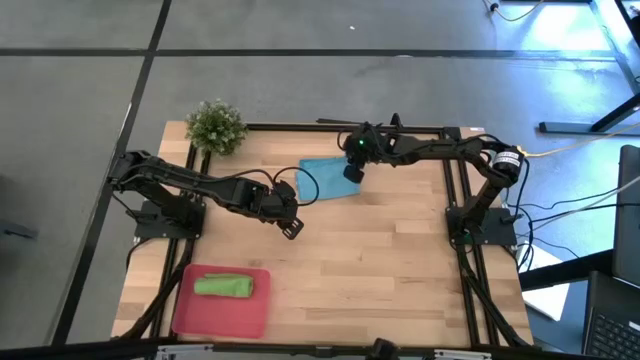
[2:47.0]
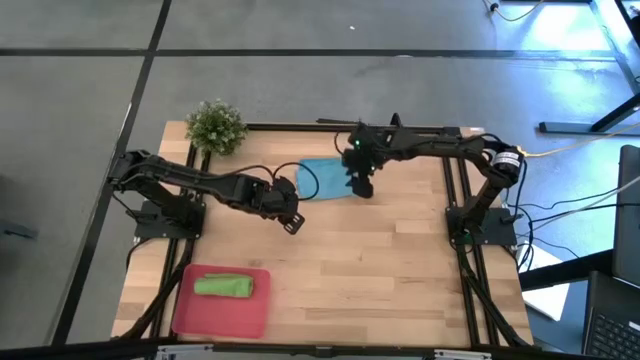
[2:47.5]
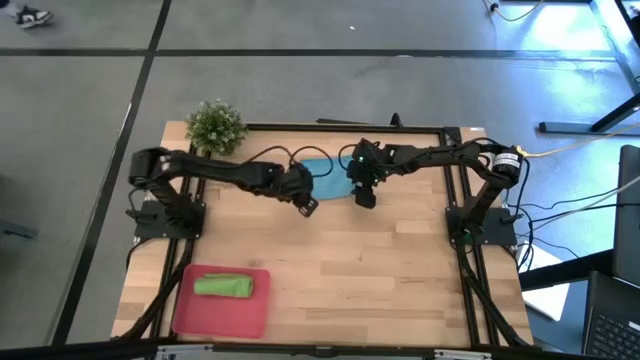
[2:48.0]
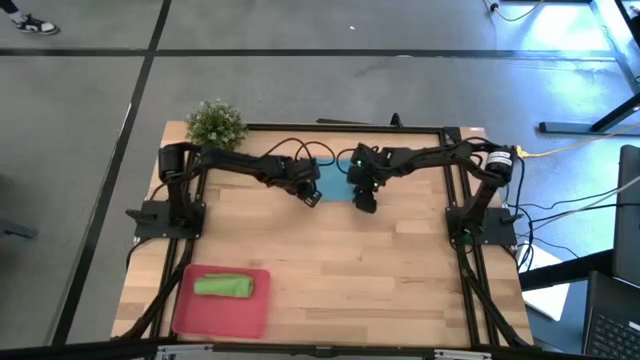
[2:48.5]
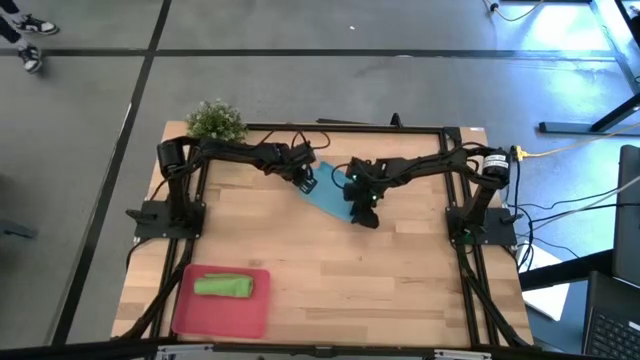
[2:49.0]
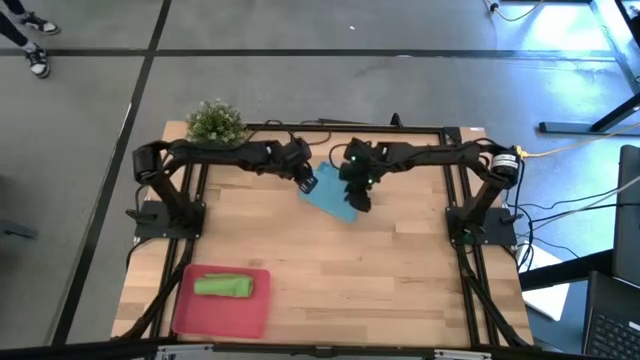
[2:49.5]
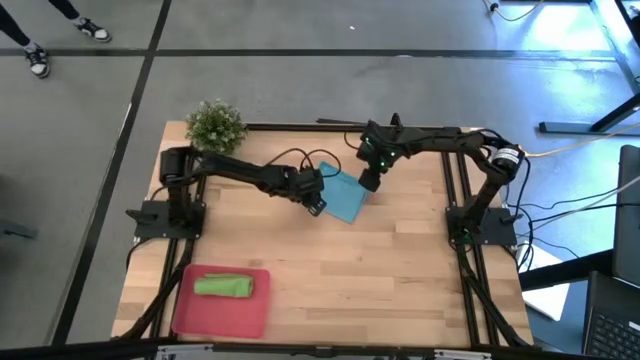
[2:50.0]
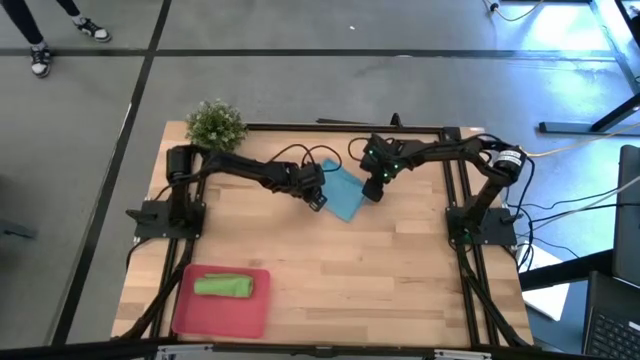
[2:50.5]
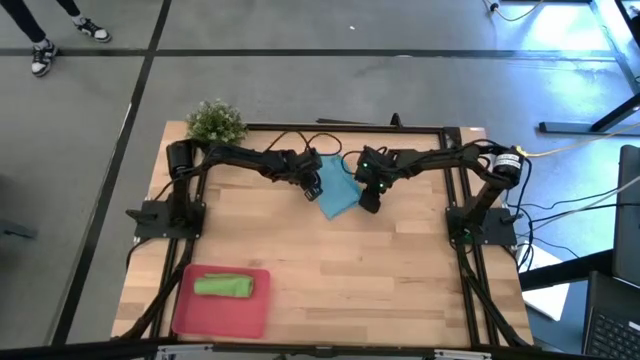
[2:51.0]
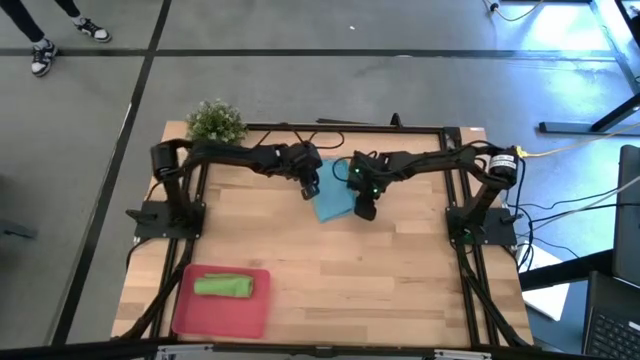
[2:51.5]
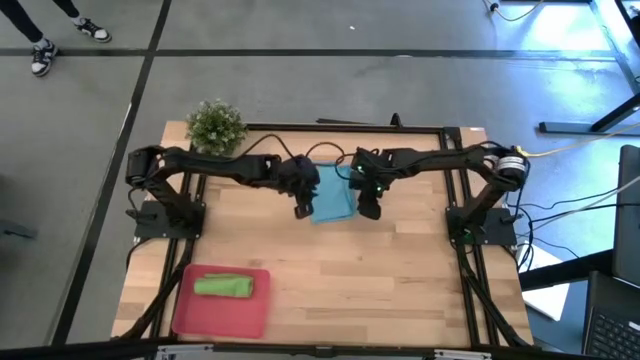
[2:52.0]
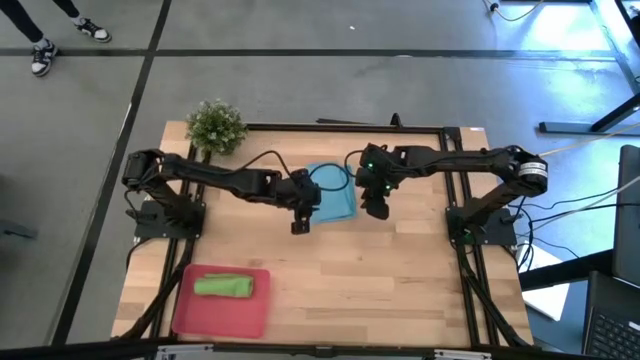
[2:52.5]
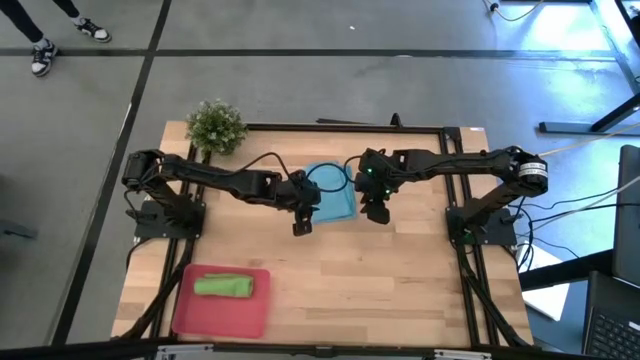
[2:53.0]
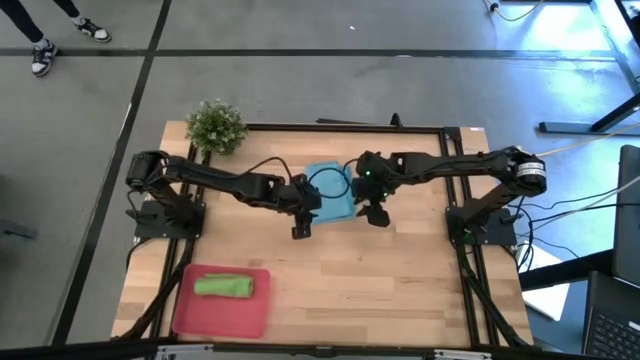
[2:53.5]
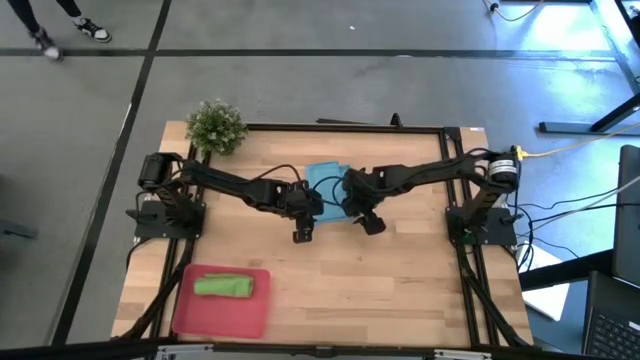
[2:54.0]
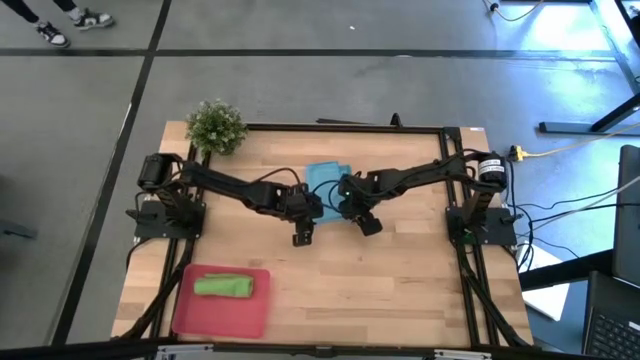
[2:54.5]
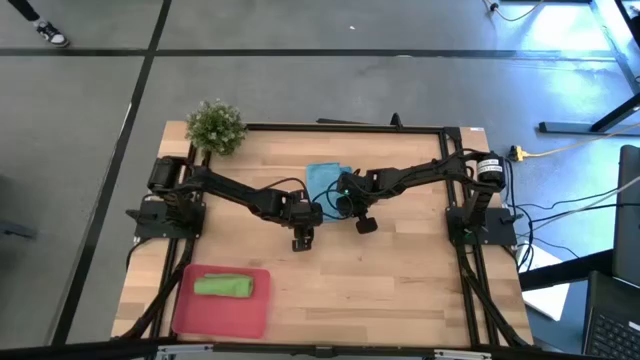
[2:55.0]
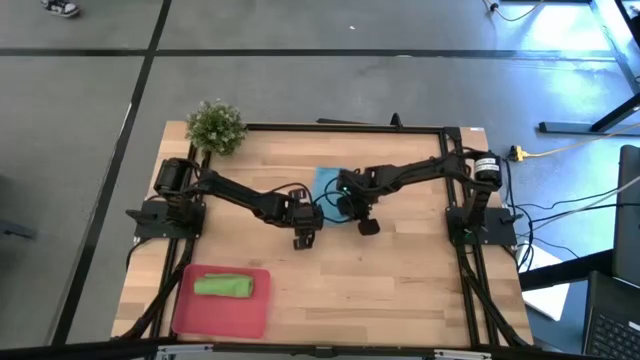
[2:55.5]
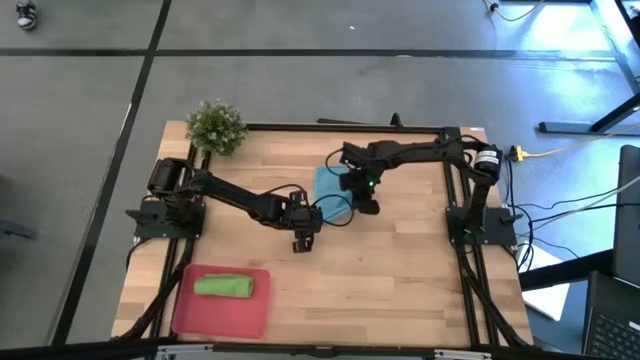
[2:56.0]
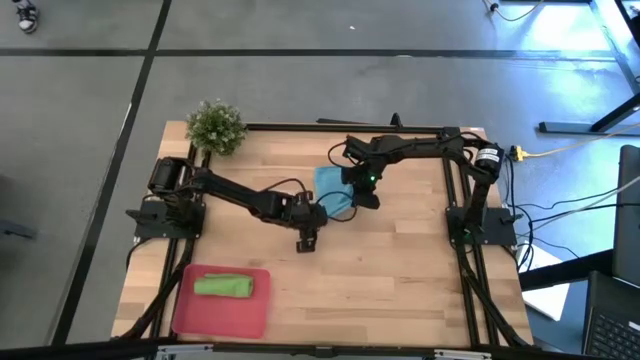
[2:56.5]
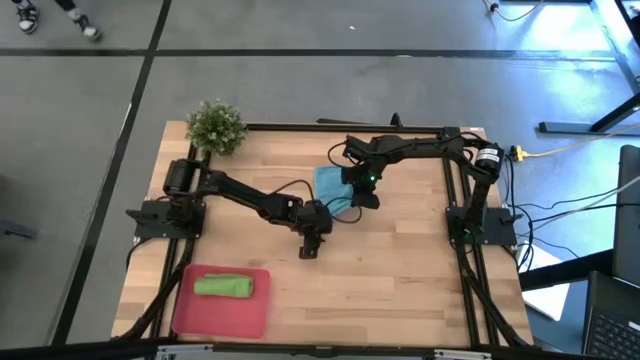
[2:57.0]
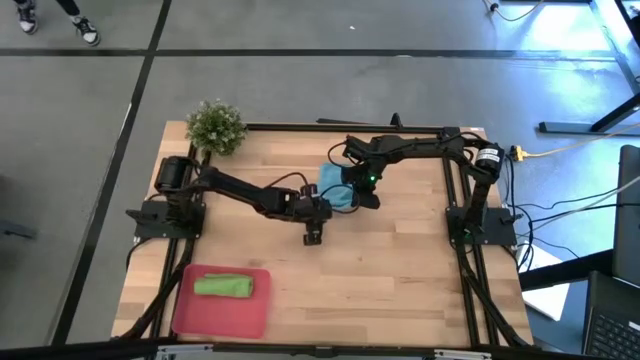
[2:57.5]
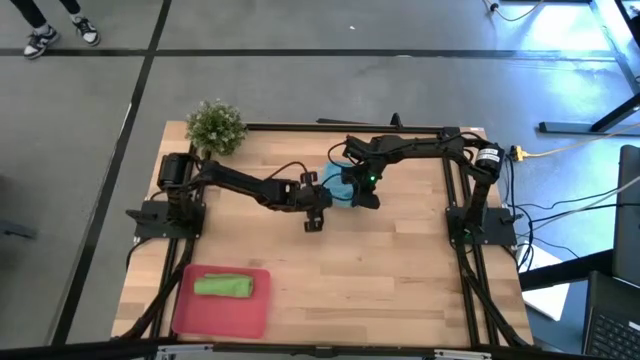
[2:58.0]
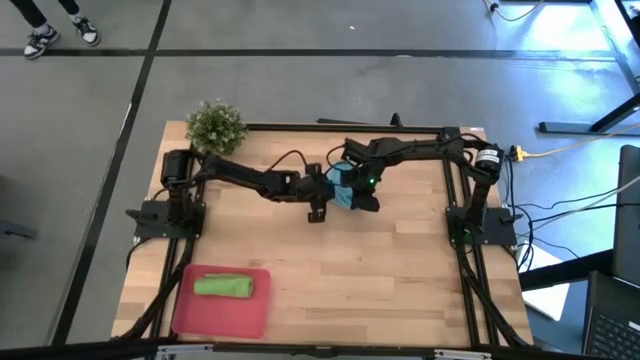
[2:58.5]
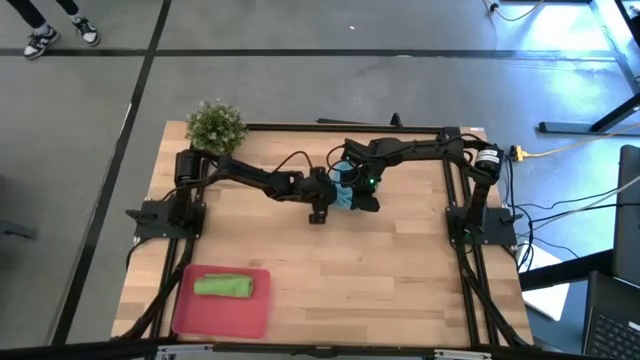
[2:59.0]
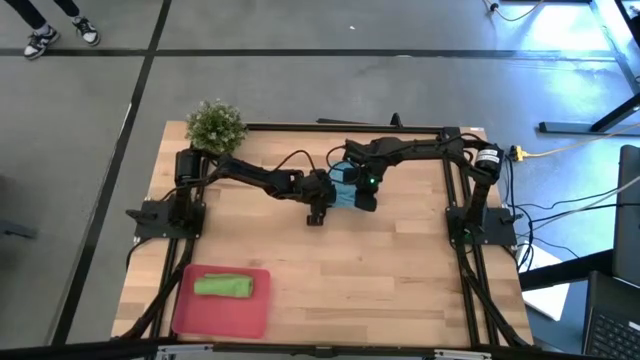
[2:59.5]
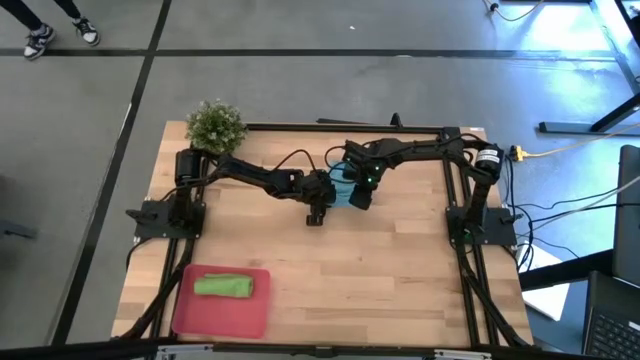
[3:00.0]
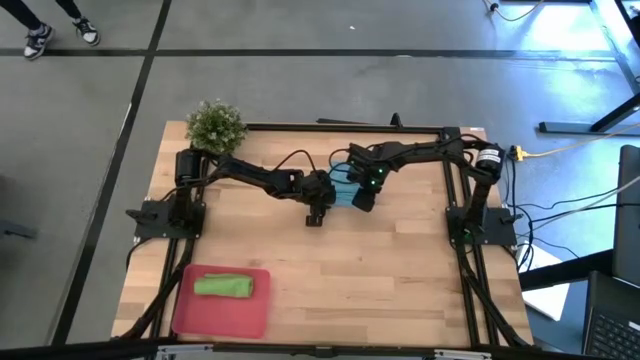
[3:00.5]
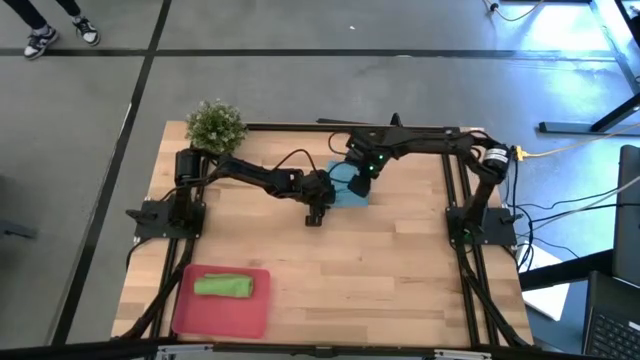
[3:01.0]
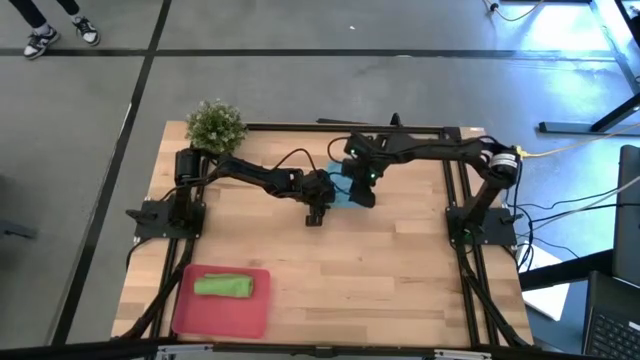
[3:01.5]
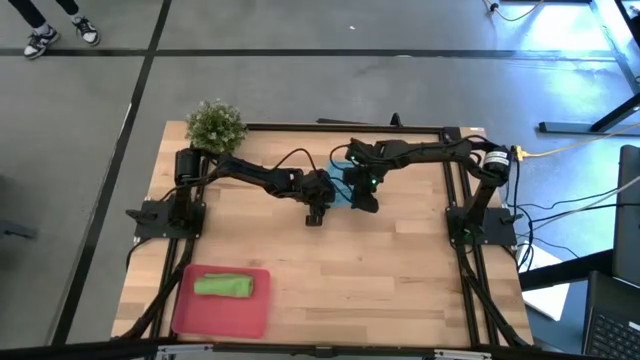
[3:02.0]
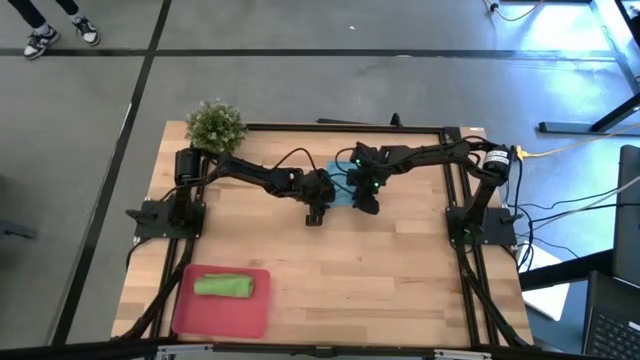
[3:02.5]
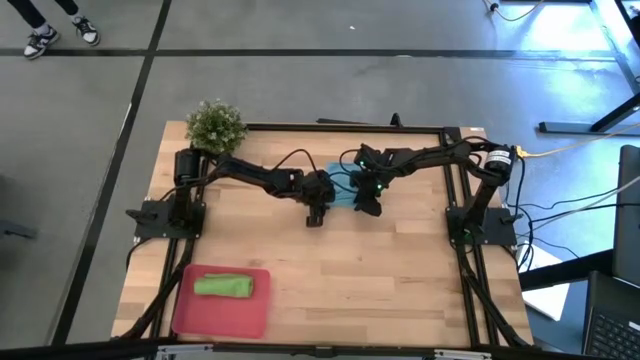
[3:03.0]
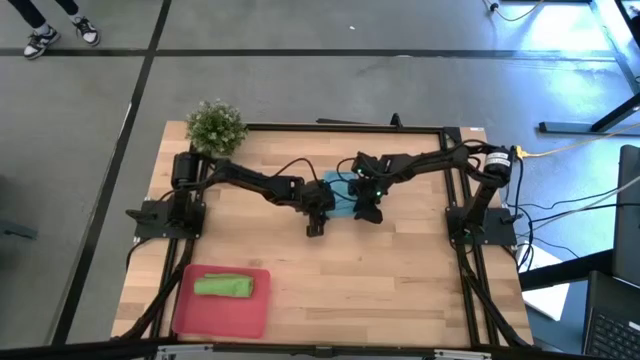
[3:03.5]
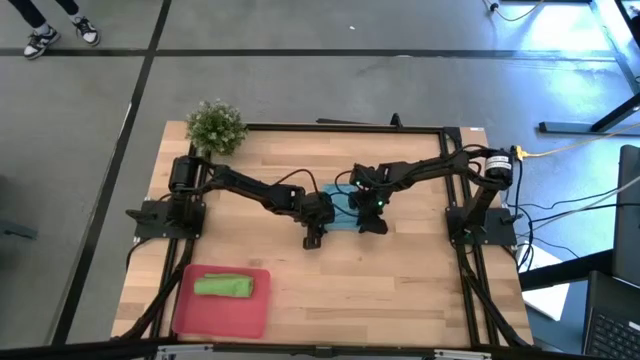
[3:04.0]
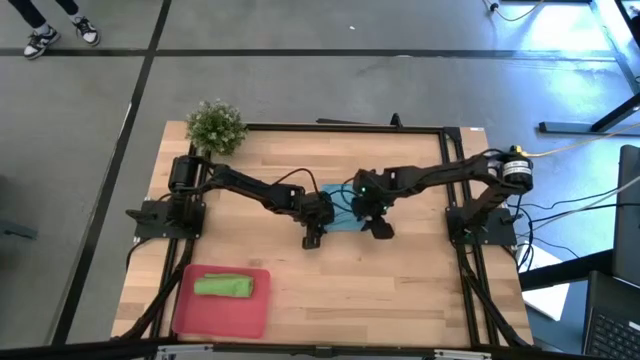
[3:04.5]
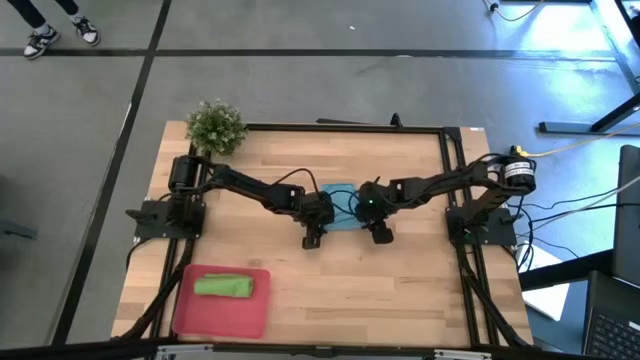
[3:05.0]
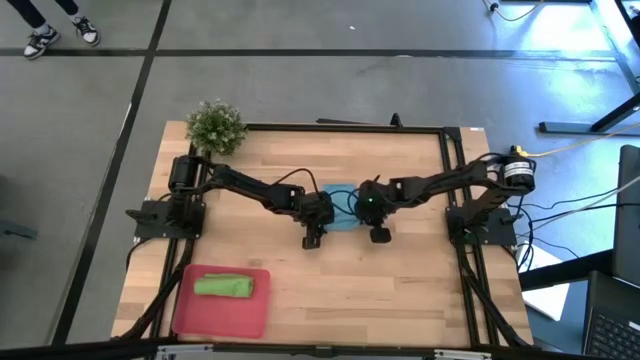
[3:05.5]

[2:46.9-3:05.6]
Task: Roll microfiber towels into tight, uniform cylinder then place into a basket
Roll the microfiber blue towel
